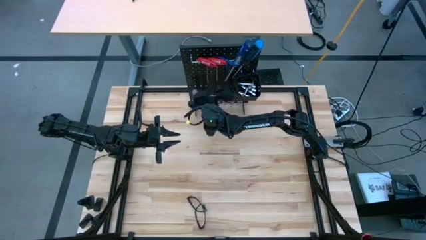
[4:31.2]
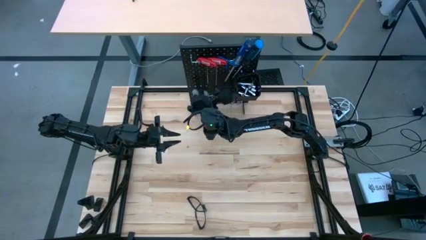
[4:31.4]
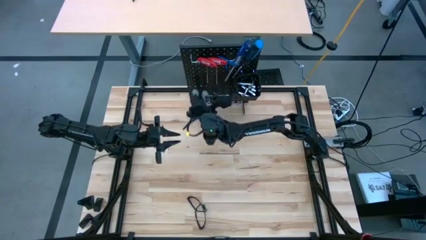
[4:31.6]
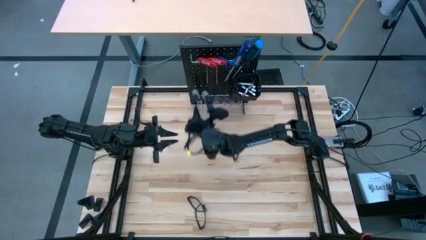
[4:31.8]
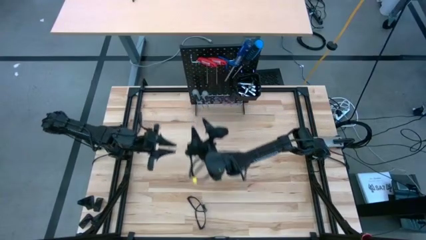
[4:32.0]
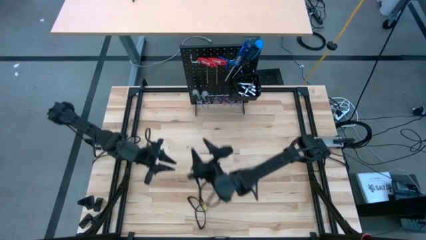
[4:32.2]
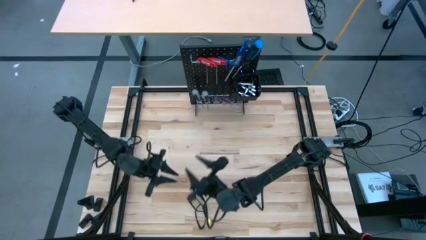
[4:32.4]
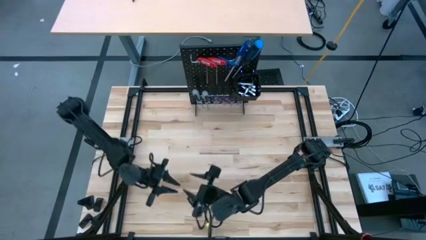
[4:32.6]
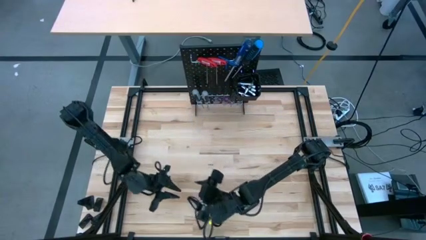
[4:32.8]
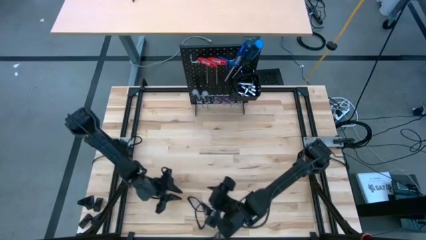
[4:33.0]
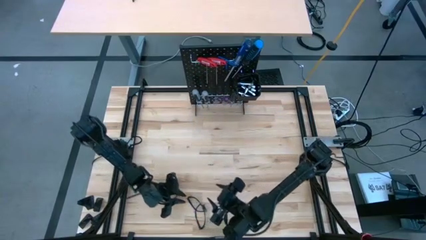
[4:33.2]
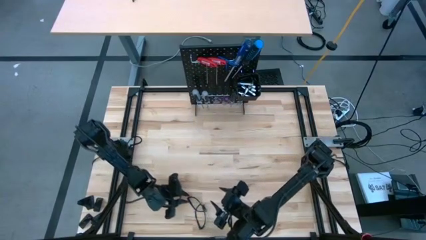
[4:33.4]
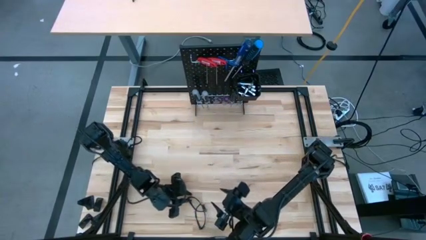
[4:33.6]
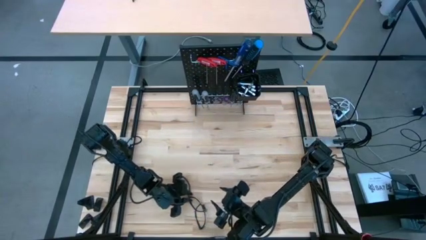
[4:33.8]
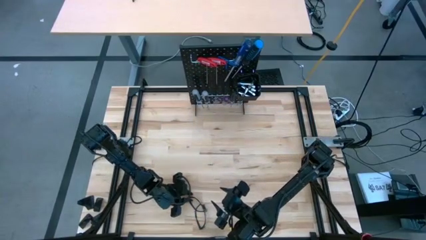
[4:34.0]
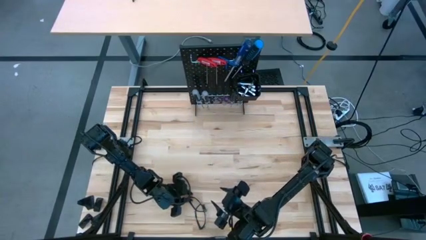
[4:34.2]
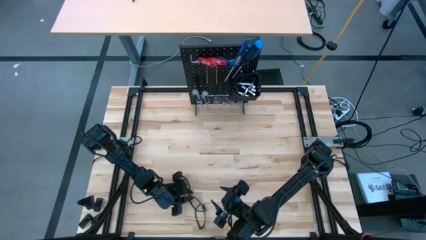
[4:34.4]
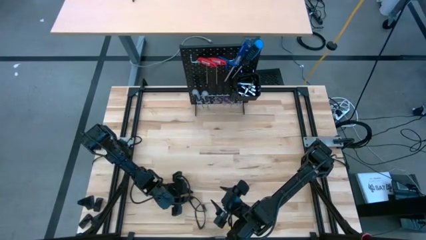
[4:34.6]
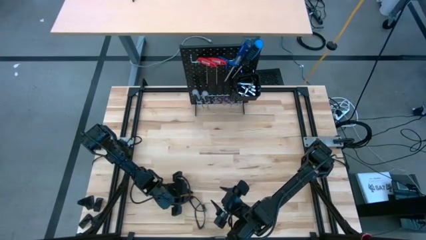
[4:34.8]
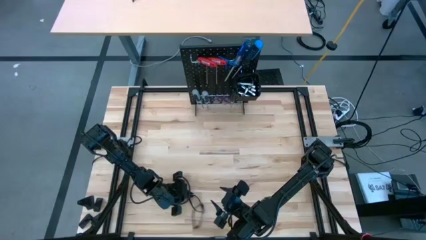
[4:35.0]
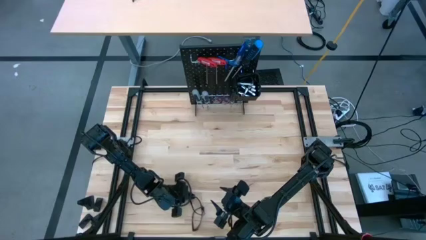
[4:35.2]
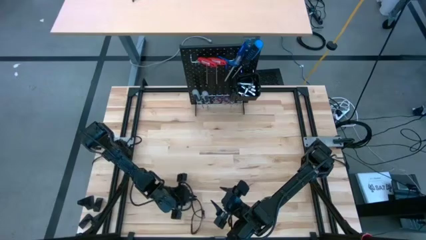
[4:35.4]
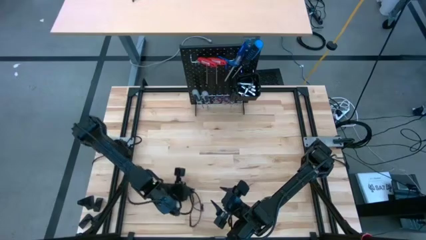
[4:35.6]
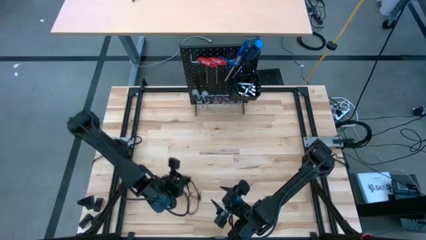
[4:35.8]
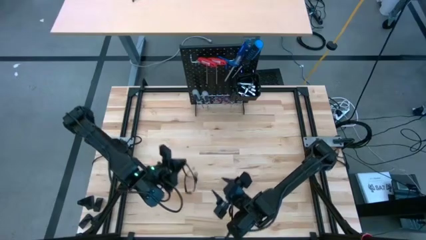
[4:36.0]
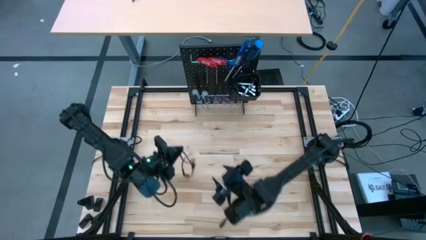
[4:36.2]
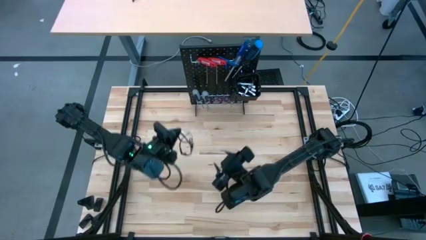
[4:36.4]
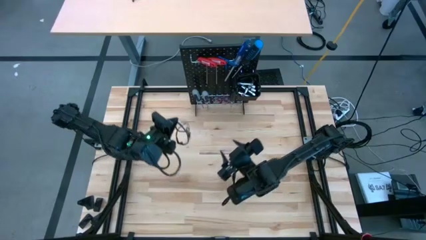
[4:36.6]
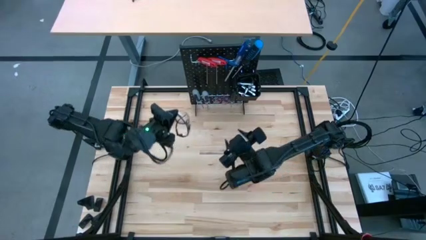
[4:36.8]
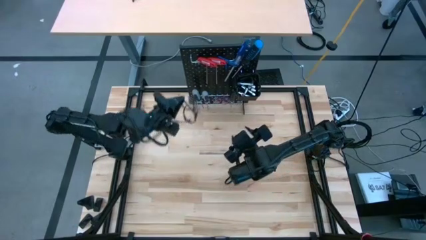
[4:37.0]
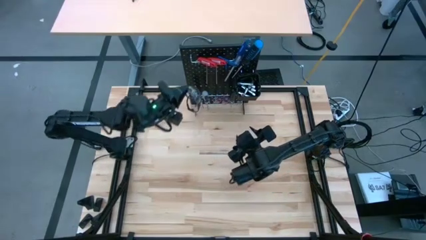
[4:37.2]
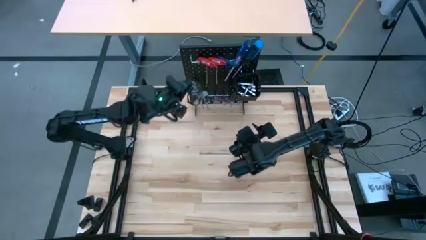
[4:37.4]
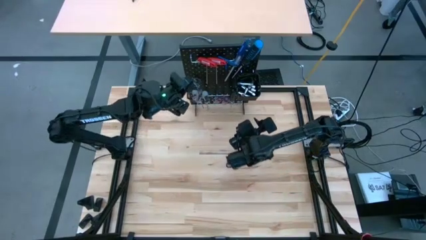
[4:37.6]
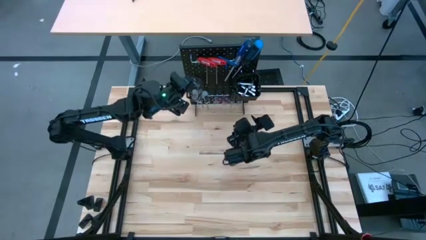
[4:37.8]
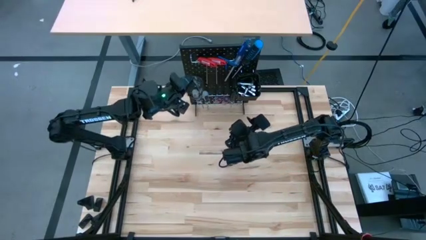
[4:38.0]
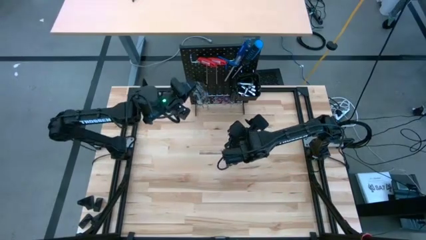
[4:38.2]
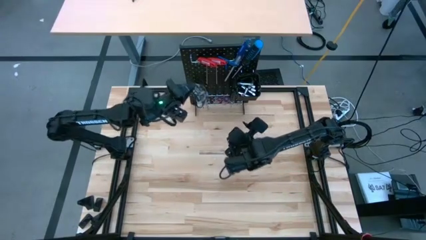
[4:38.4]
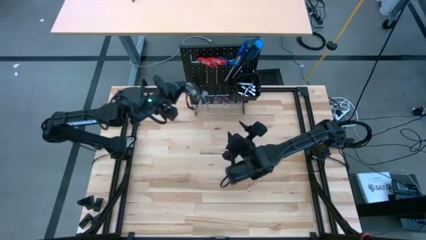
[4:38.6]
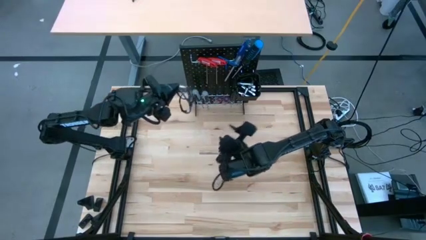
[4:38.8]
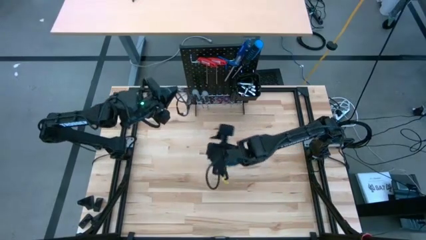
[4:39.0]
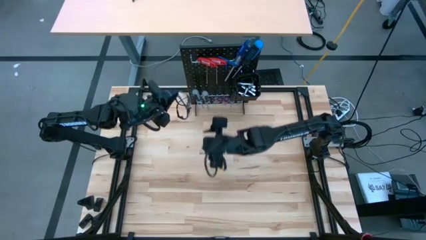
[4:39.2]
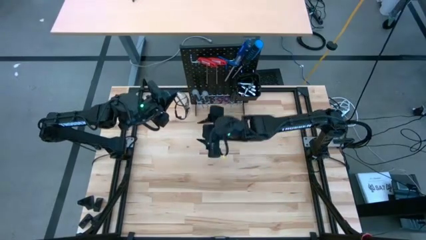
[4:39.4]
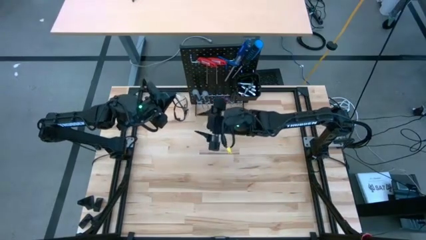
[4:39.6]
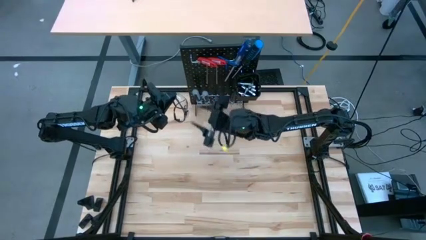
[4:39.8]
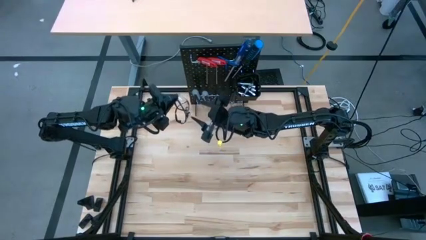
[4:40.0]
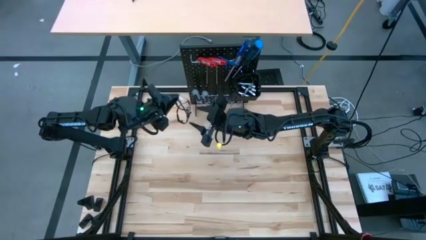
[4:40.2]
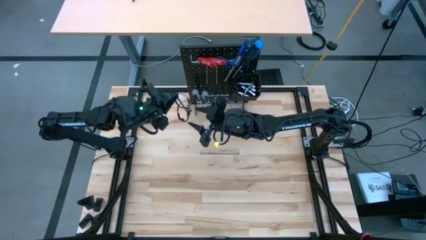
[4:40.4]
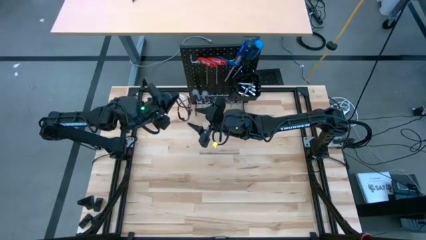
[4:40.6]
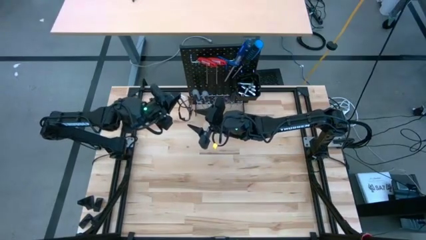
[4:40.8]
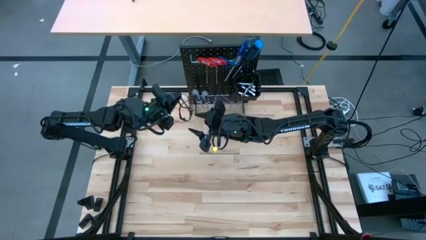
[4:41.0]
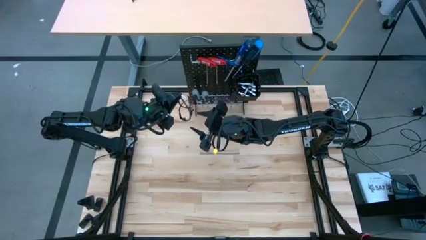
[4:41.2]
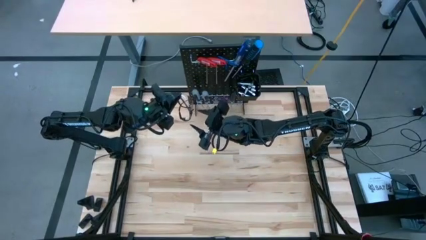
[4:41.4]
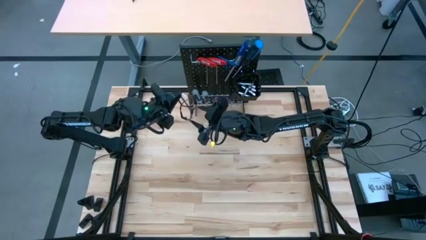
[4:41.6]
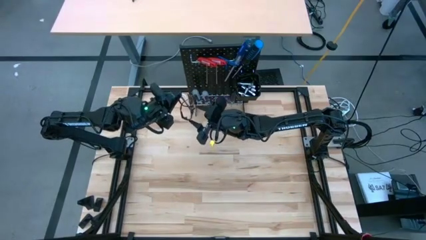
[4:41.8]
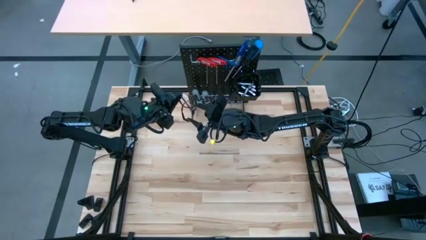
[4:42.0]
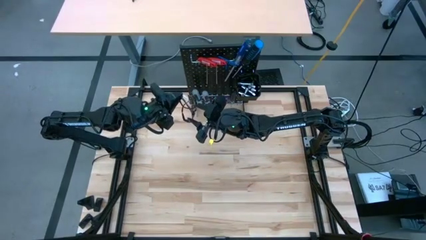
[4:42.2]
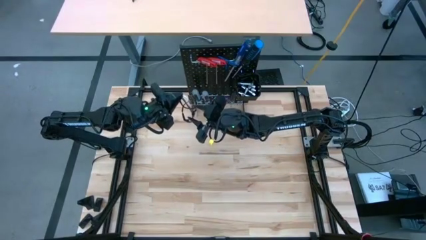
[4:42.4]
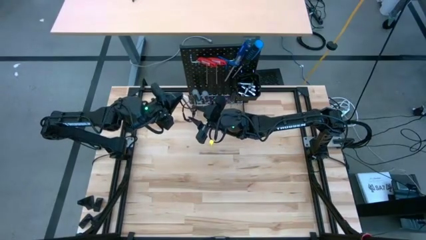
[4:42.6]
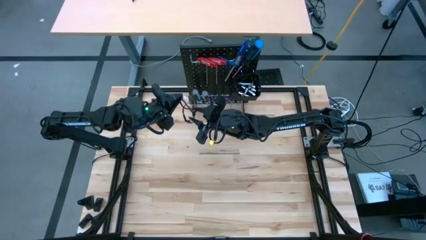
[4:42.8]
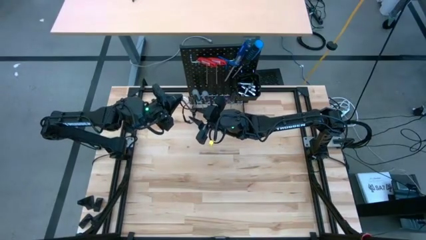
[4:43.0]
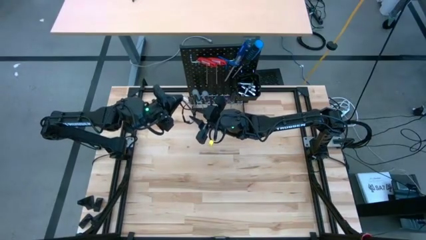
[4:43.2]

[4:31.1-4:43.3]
Task: Hang tools onto peg board
Hang the safety glasses on the pegboard

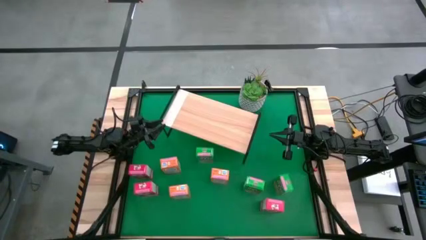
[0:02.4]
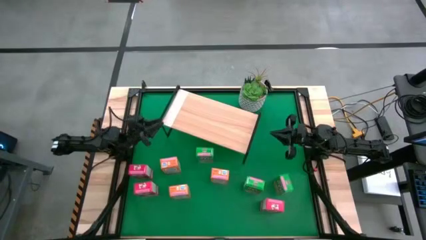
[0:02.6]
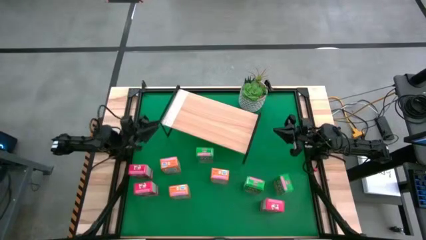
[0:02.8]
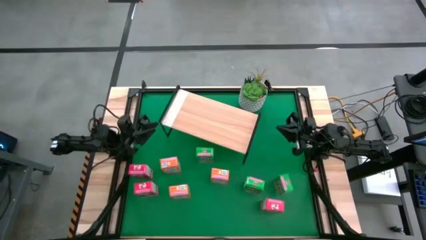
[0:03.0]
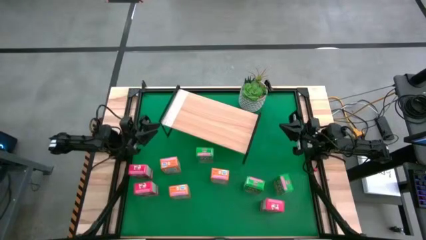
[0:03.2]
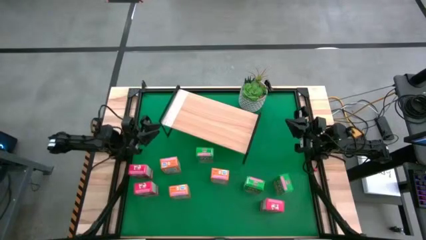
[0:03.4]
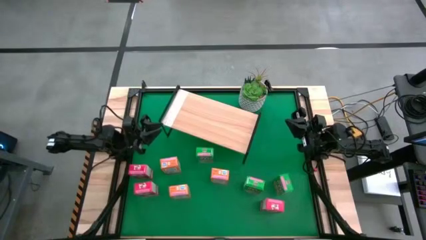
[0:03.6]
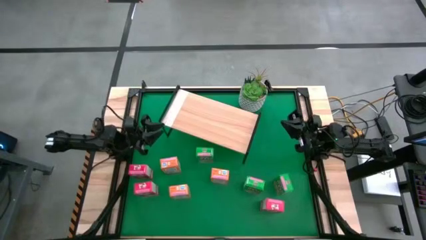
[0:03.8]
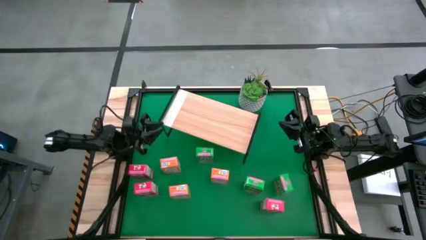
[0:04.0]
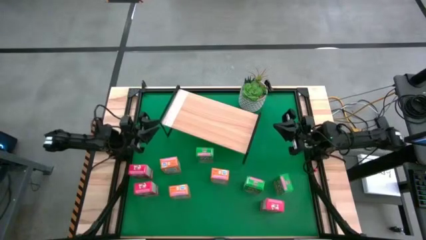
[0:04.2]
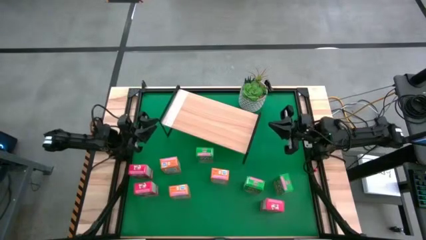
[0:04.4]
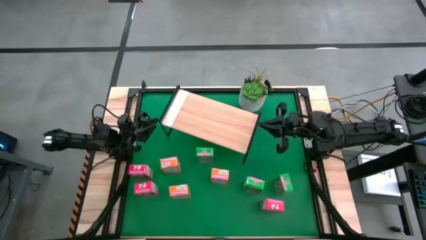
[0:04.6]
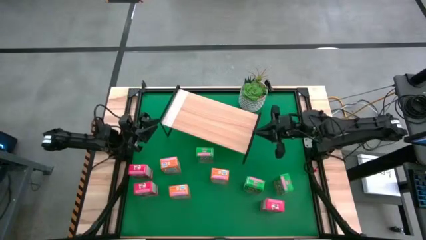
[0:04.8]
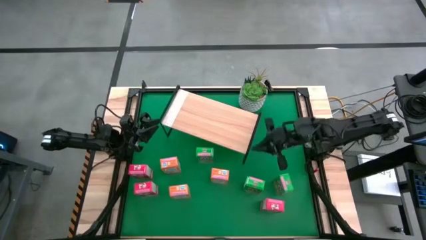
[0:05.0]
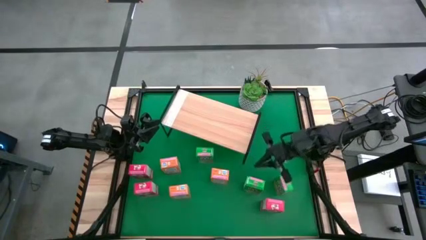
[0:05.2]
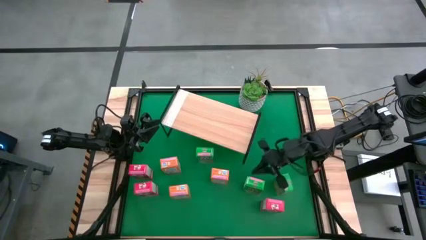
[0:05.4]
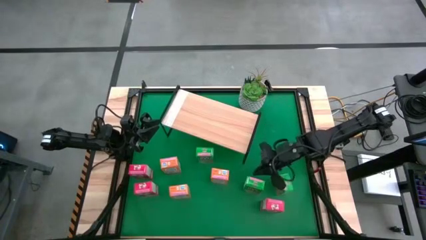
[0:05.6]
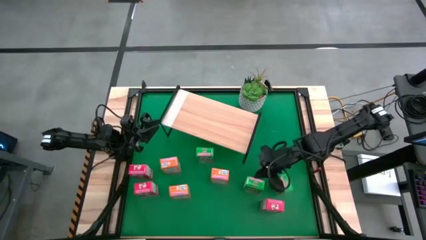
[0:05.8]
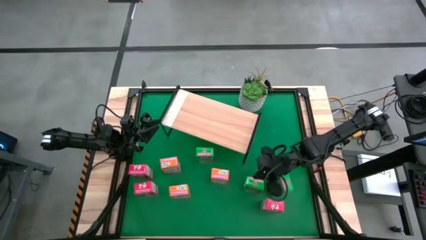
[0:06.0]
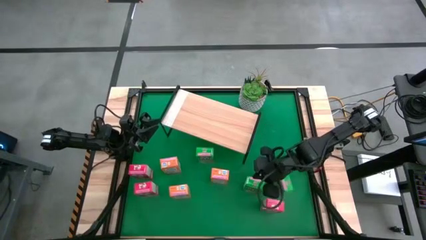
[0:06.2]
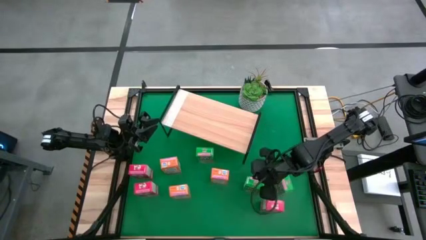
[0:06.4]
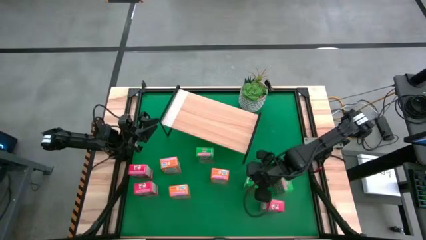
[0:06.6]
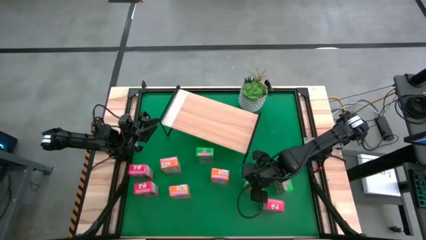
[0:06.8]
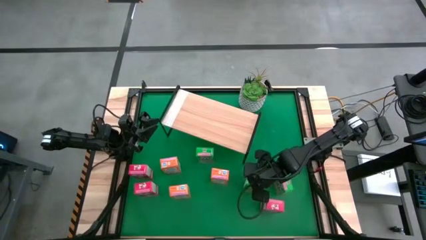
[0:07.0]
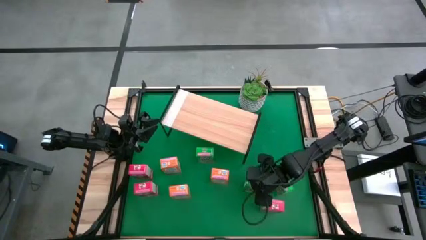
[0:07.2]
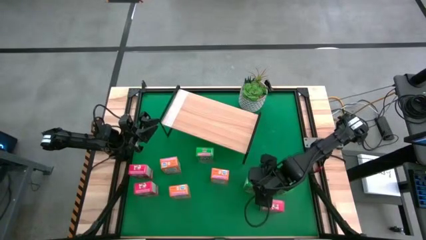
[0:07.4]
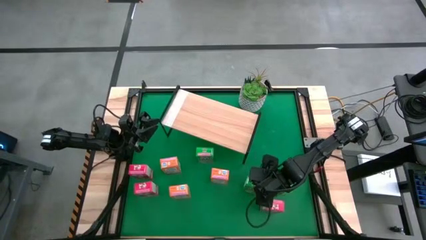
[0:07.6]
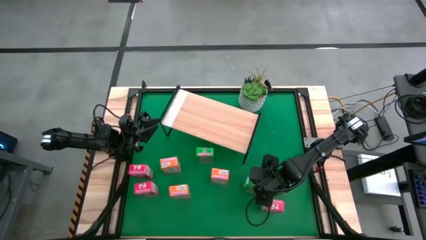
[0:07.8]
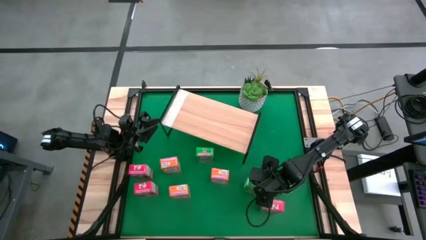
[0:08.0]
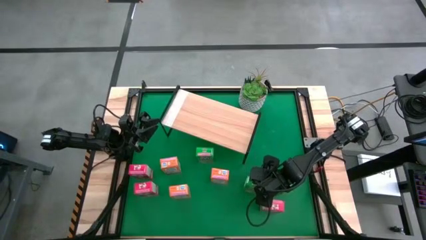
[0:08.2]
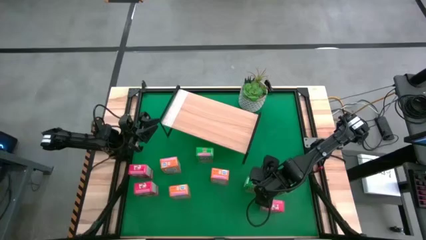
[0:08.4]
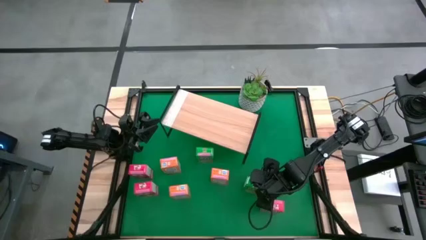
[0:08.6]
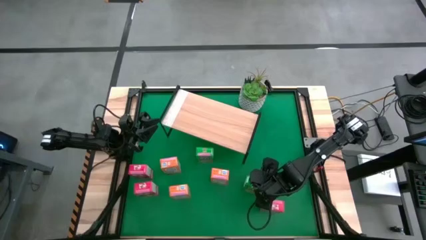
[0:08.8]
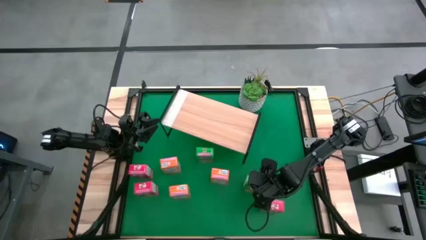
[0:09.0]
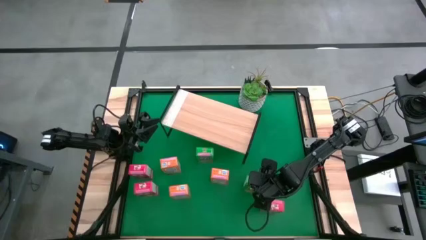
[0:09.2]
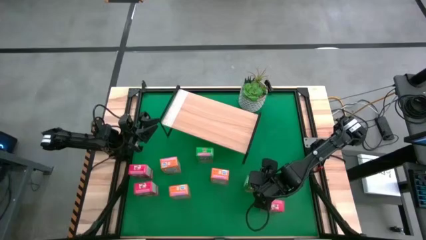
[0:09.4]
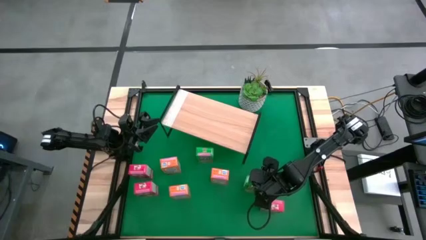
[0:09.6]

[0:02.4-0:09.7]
Task: Stack cereal on shelf
Put the middle green cereal box on the shelf
